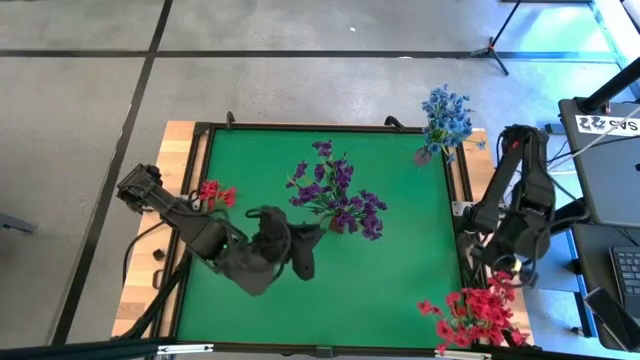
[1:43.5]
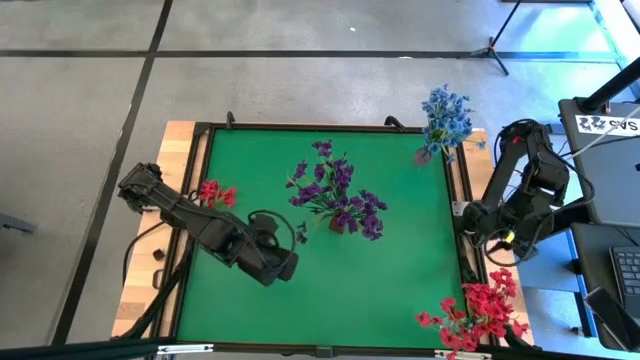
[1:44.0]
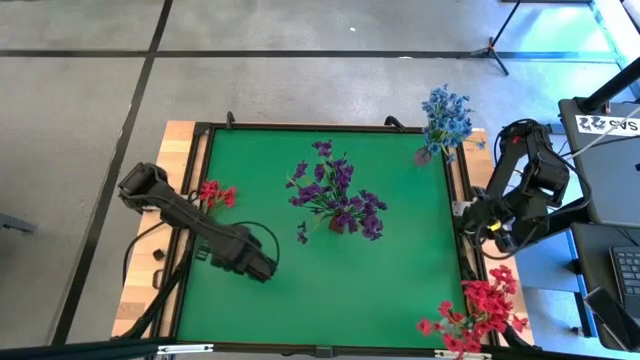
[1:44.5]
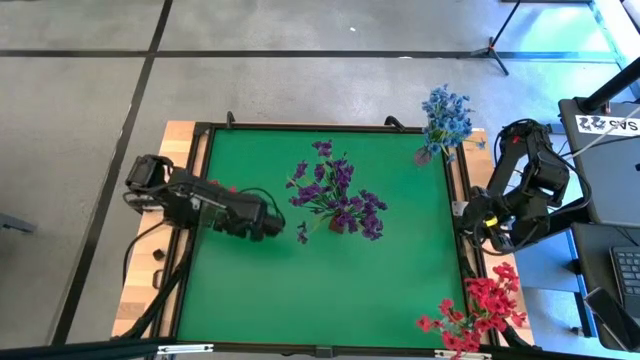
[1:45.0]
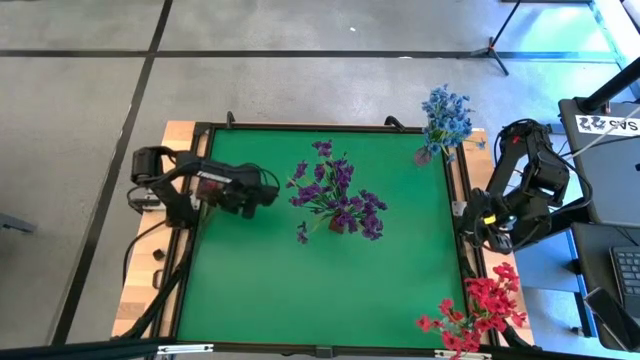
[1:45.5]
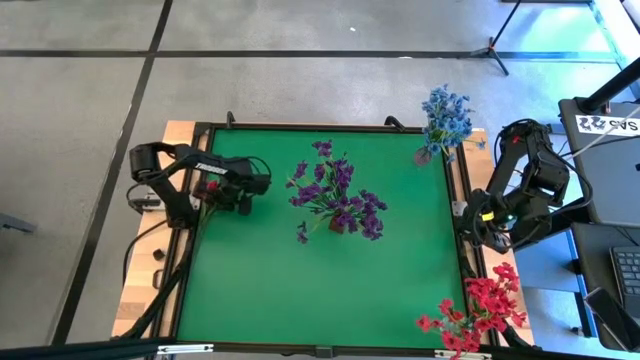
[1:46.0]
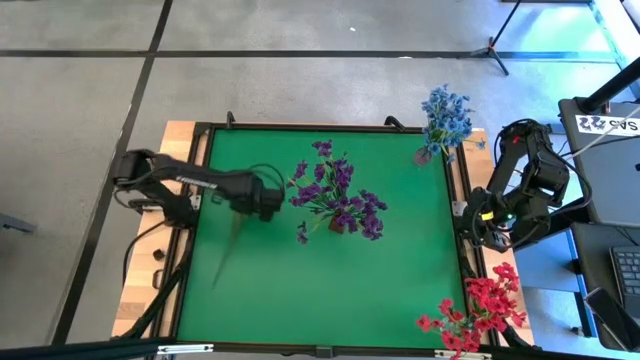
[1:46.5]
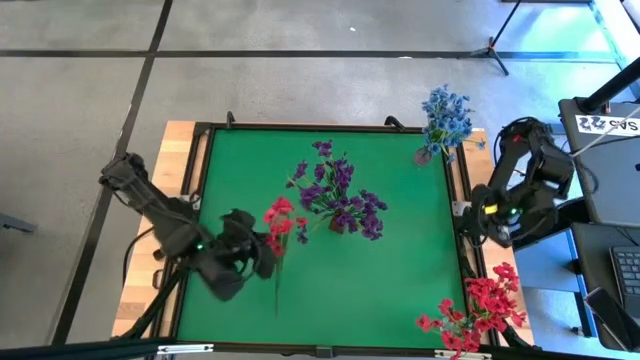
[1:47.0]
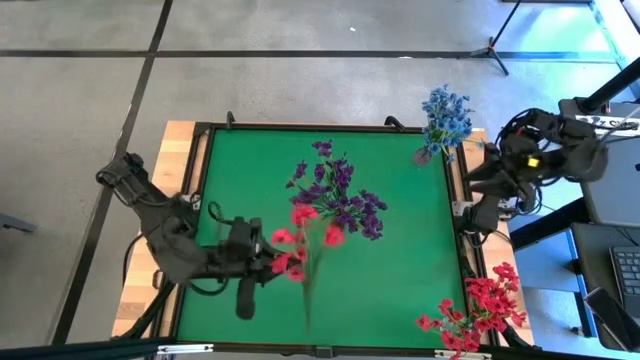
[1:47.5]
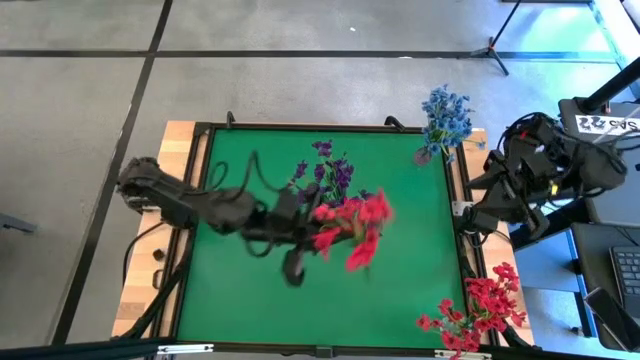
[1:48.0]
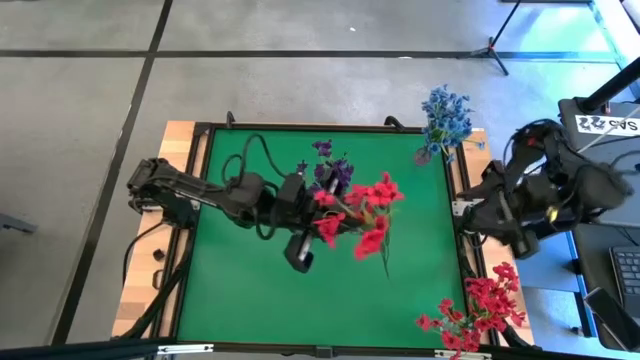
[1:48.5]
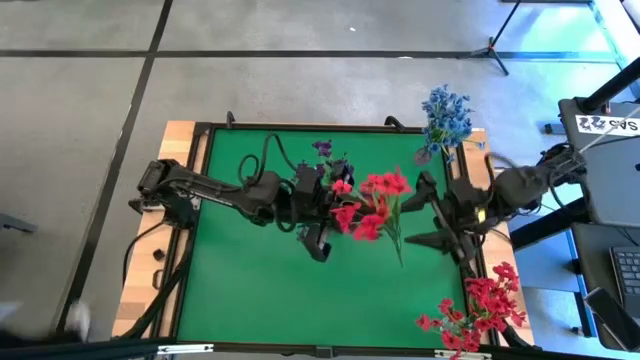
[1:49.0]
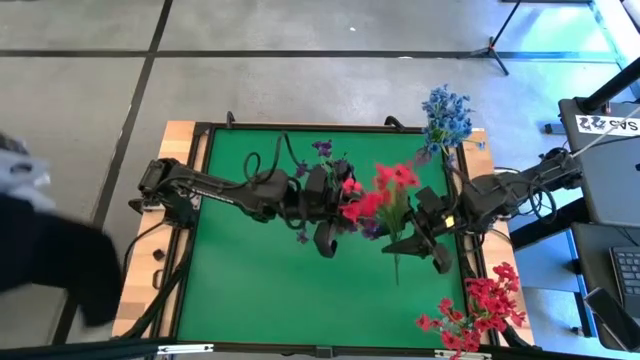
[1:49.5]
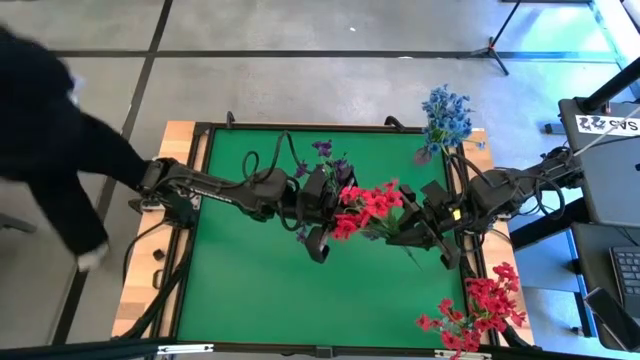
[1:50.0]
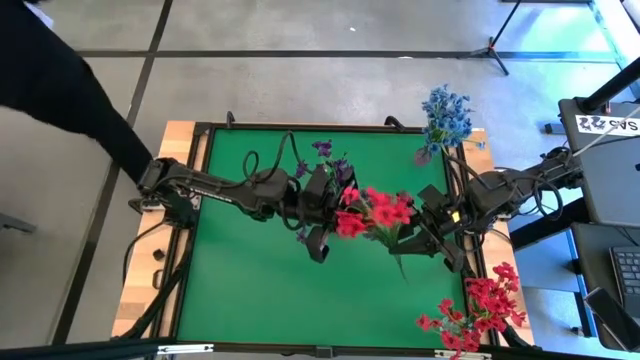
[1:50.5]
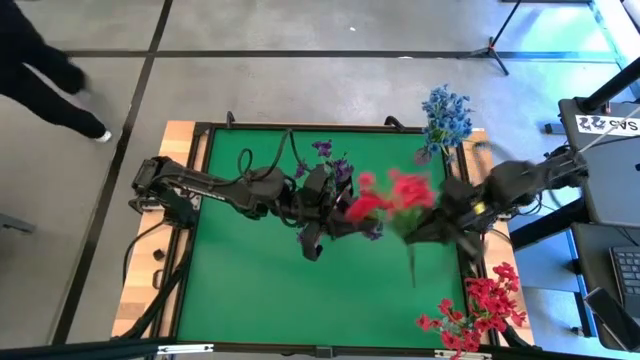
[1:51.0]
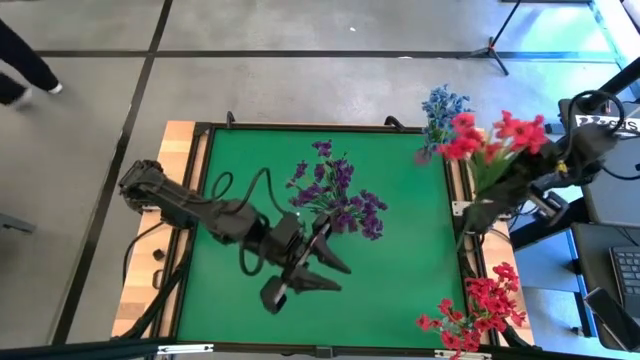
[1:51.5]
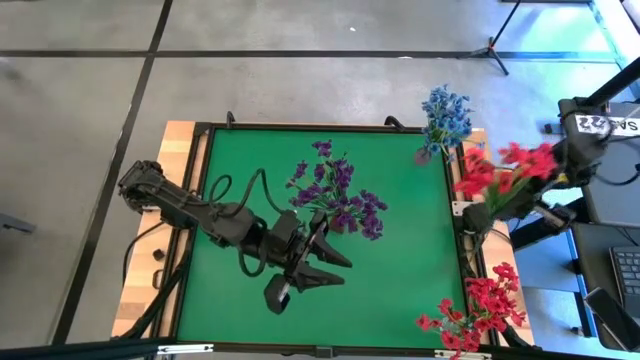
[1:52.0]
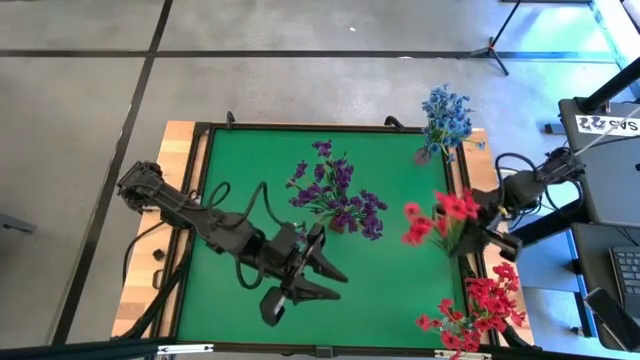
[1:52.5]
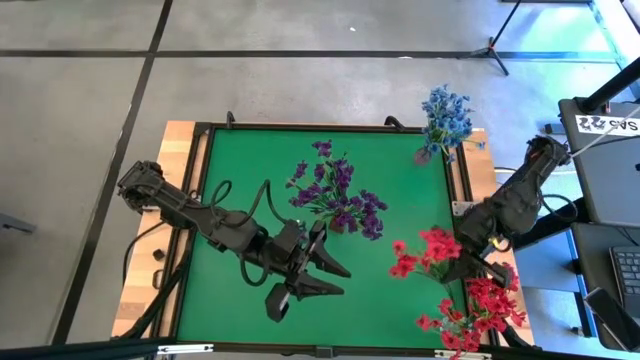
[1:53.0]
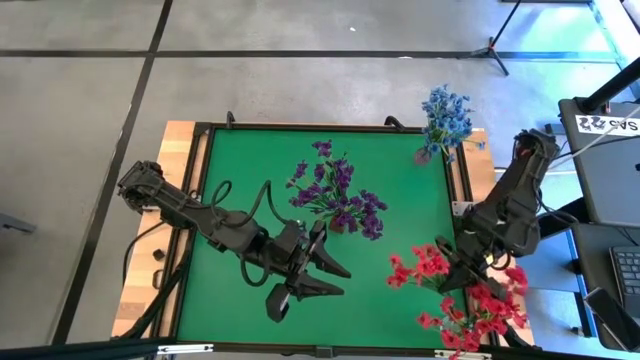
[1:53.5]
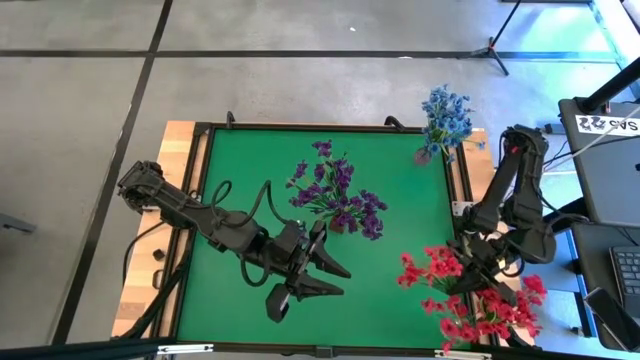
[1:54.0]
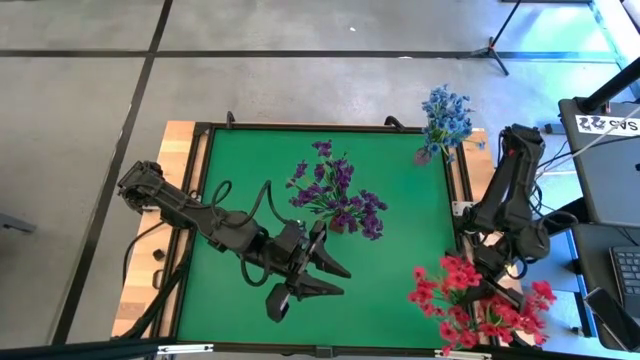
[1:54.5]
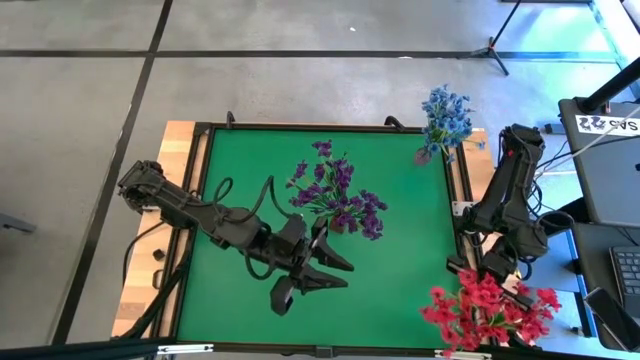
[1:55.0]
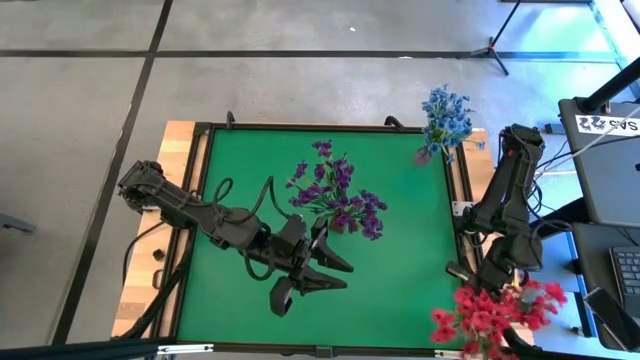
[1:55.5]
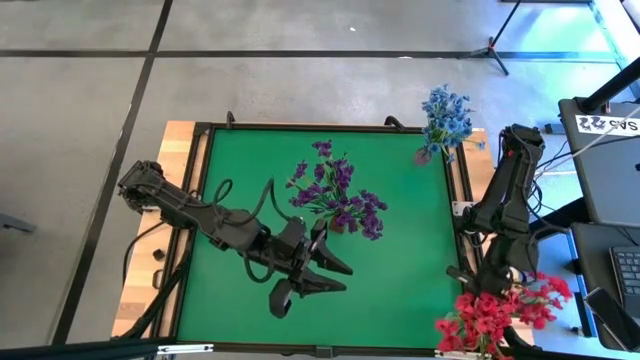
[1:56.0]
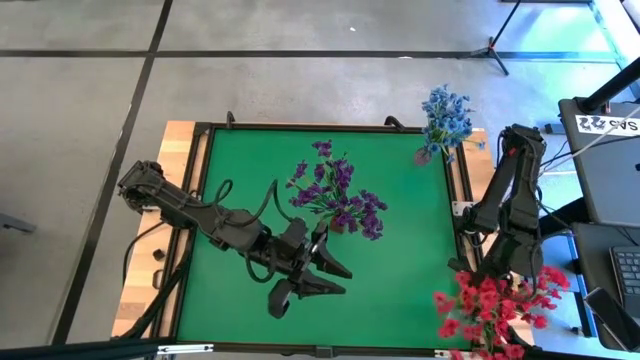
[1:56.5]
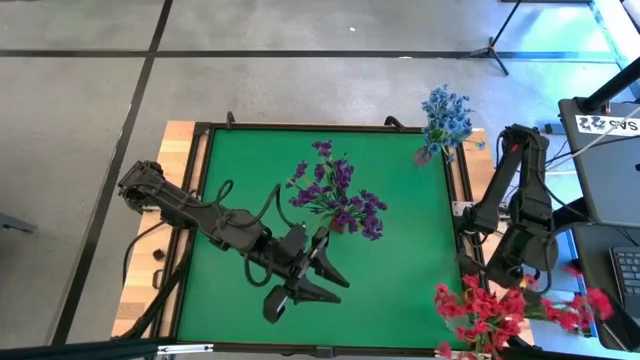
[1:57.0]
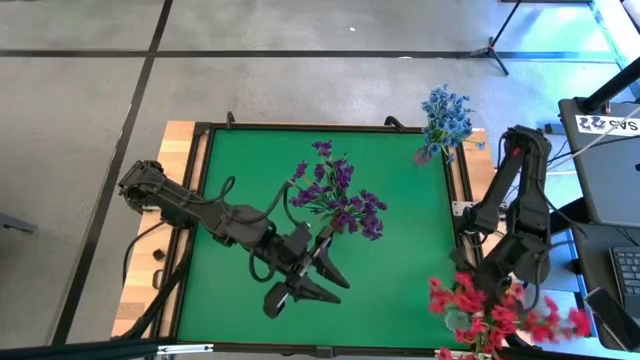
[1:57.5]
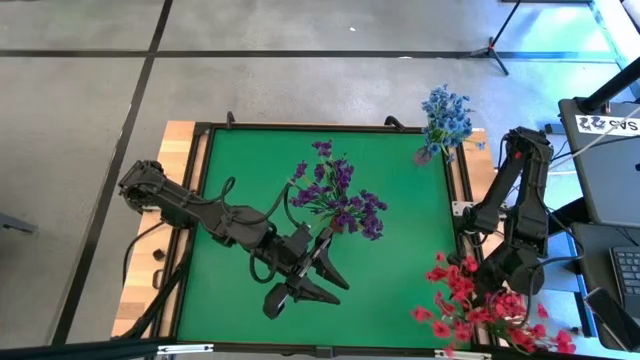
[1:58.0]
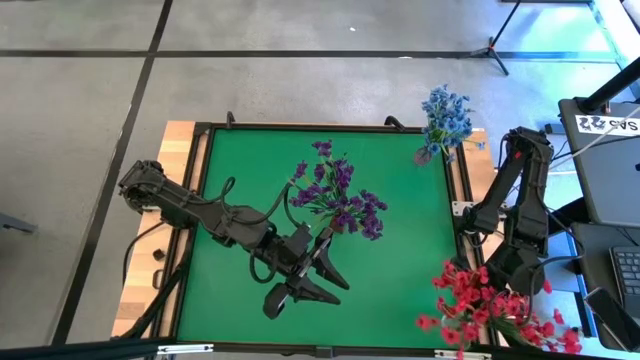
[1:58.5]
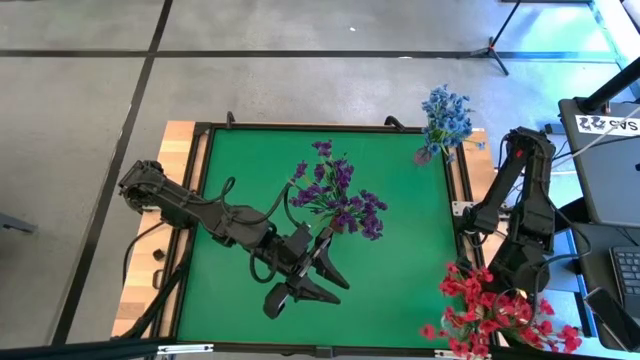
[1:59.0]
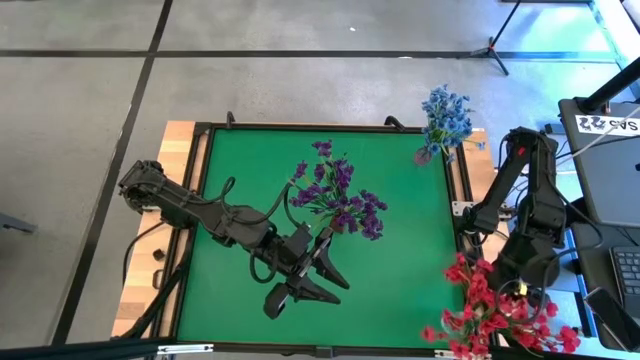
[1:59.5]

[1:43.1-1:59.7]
Task: Sort flowers into vase by color
Put the red flowers into the transparent vase

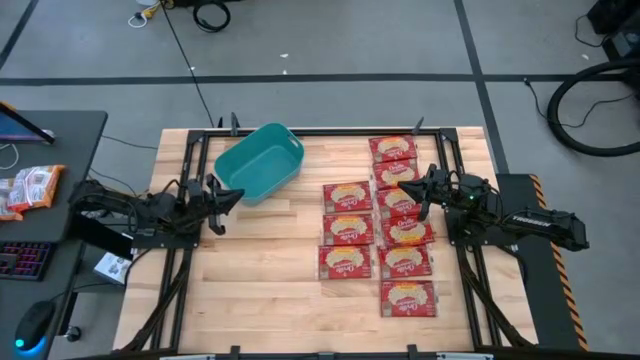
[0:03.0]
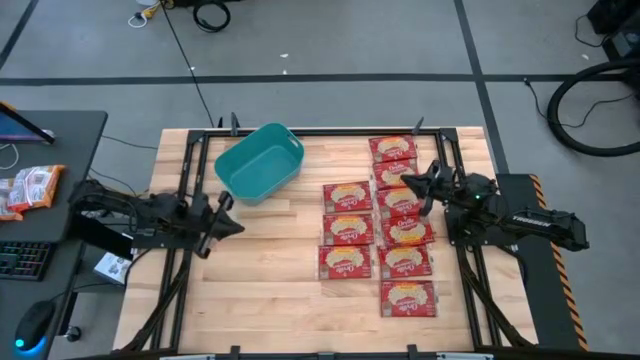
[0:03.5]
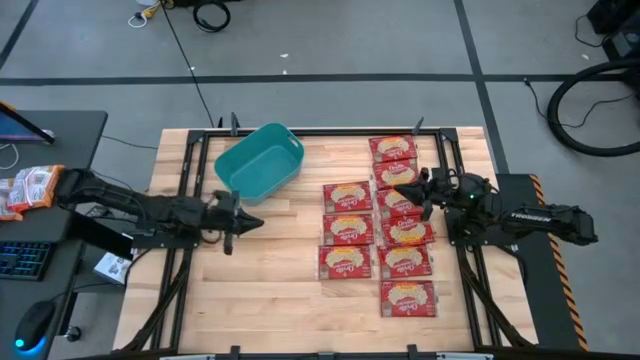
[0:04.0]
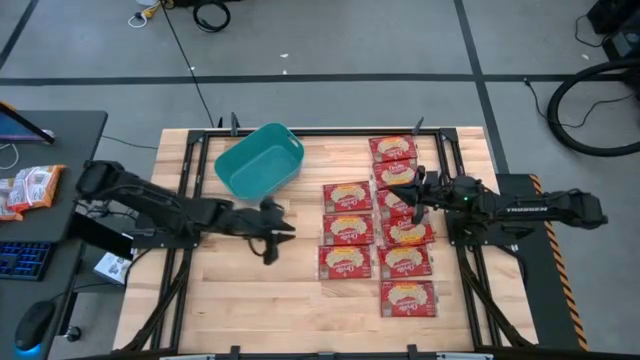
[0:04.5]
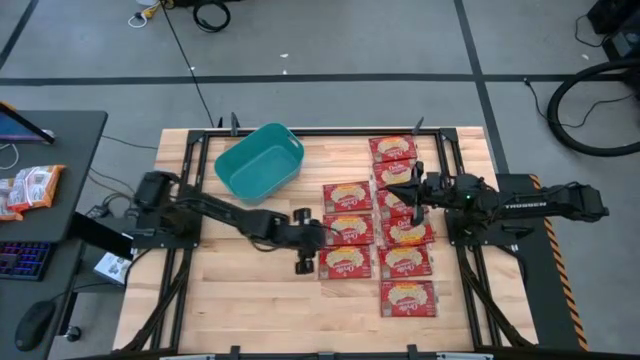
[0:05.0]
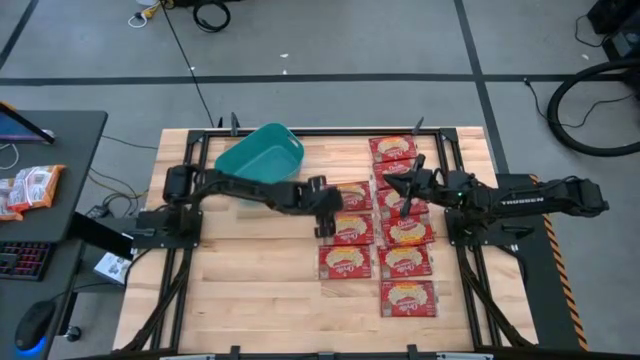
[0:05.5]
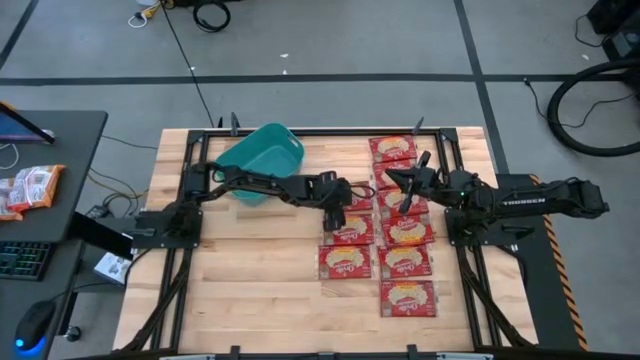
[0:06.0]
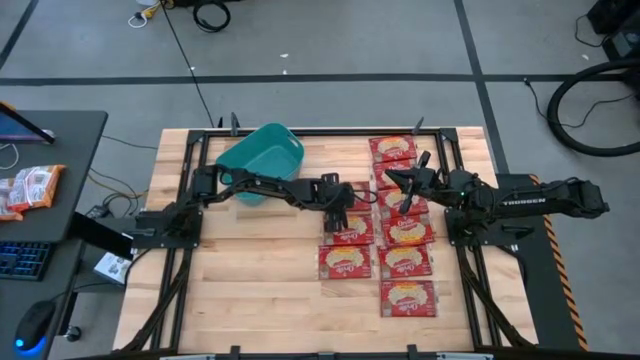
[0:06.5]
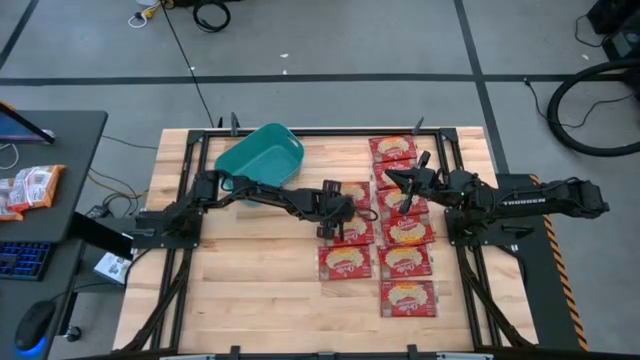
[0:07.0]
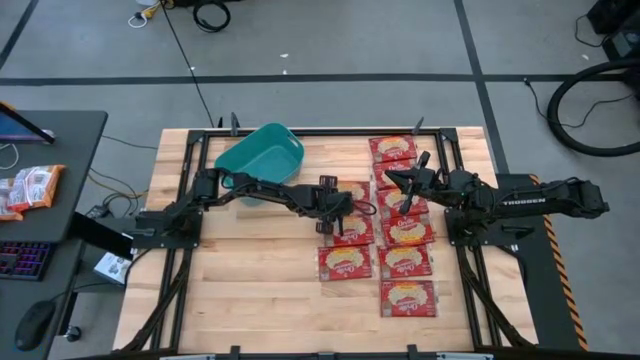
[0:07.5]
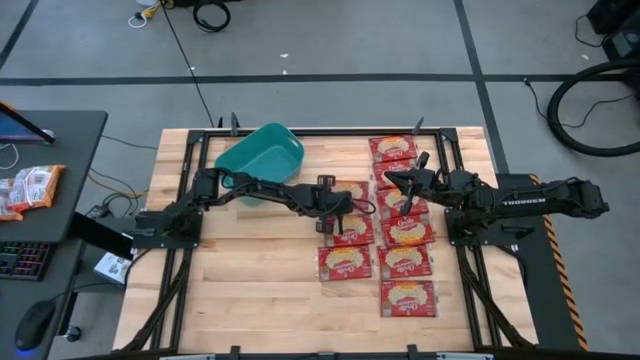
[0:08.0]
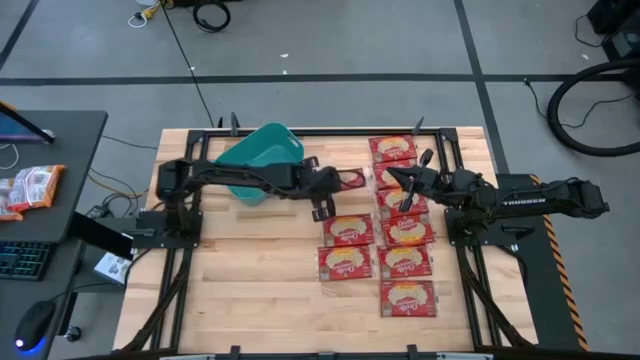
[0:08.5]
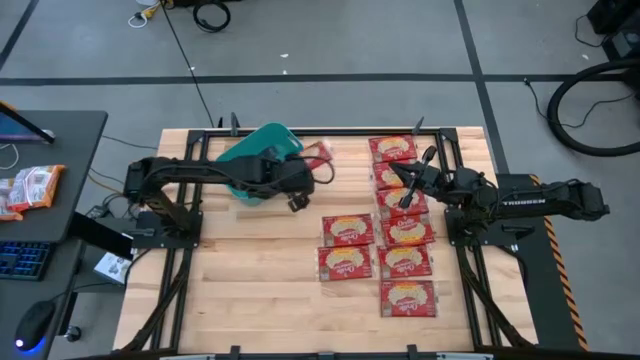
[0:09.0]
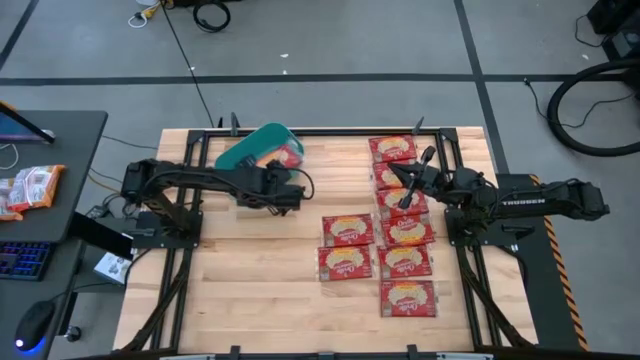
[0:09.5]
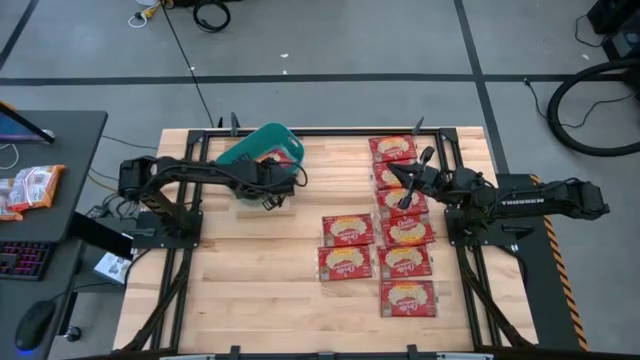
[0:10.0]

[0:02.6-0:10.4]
Task: Sort popcorn bags into baskets
Put the popcorn bag into the bin
